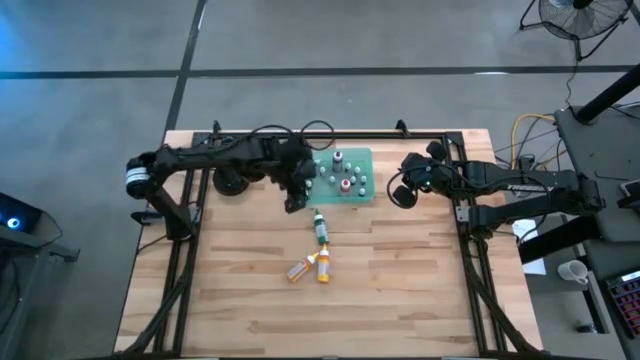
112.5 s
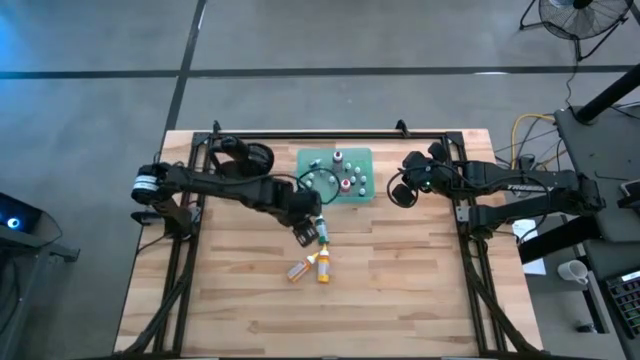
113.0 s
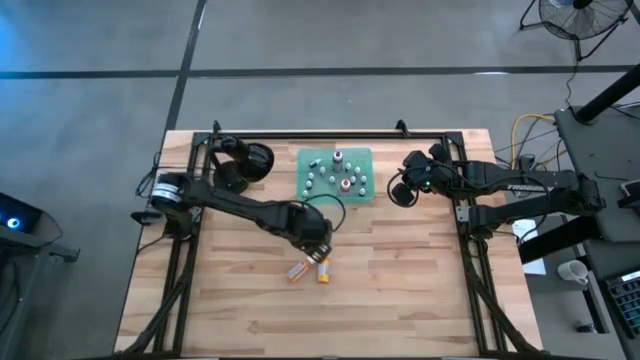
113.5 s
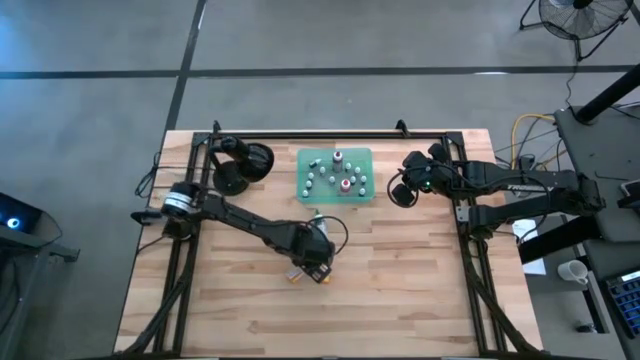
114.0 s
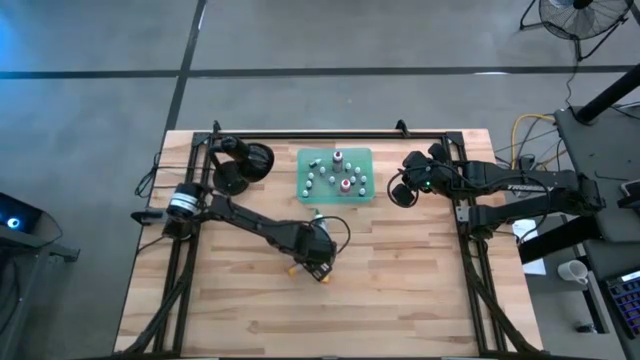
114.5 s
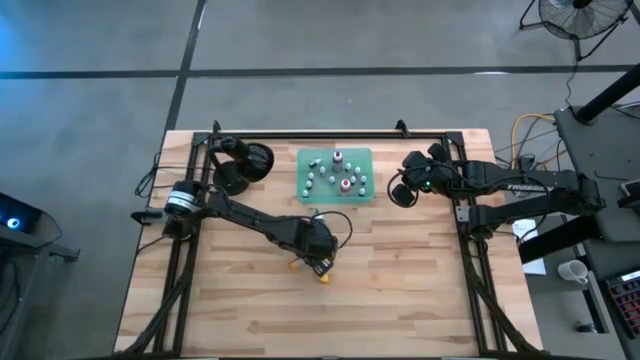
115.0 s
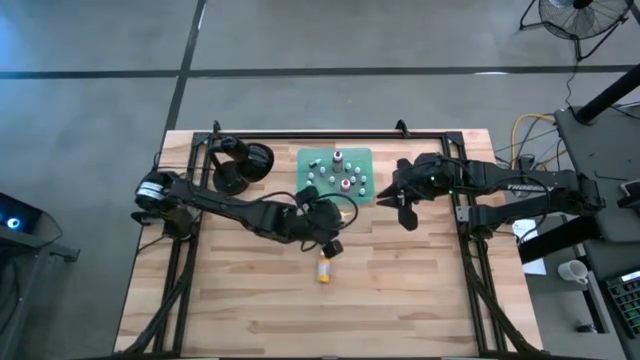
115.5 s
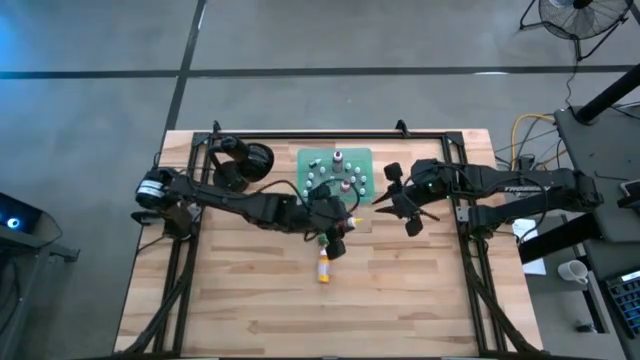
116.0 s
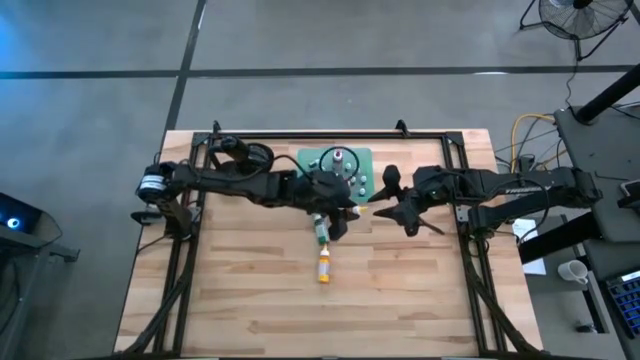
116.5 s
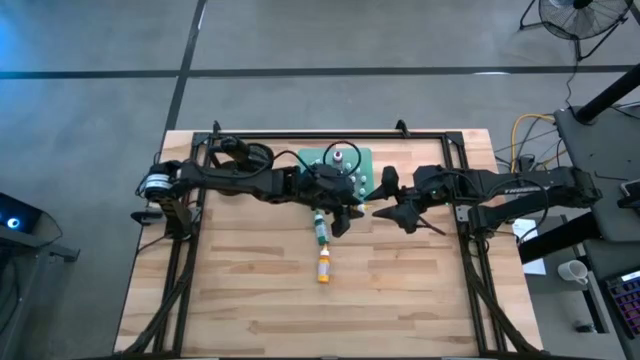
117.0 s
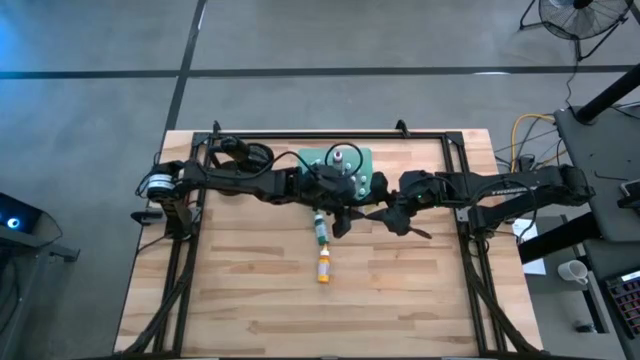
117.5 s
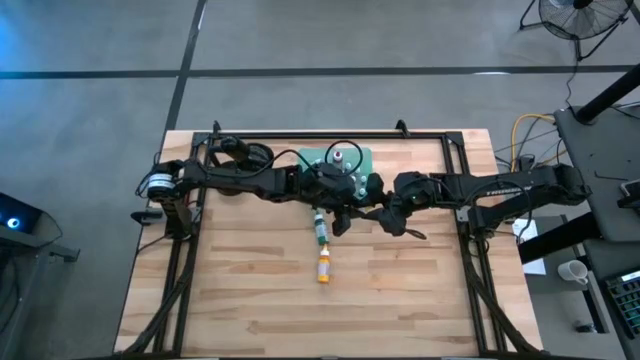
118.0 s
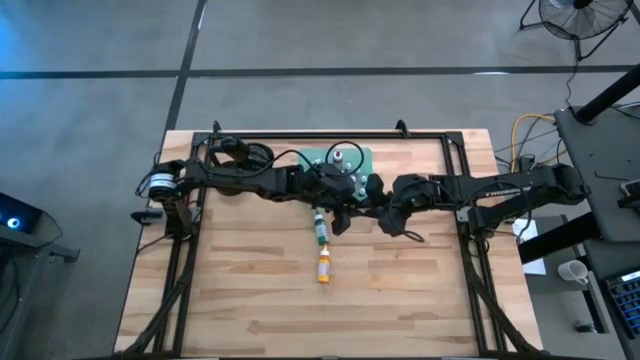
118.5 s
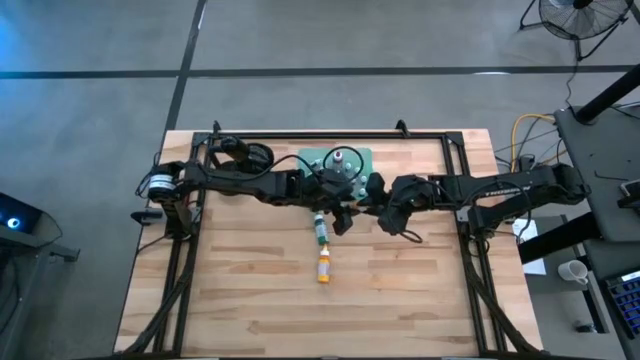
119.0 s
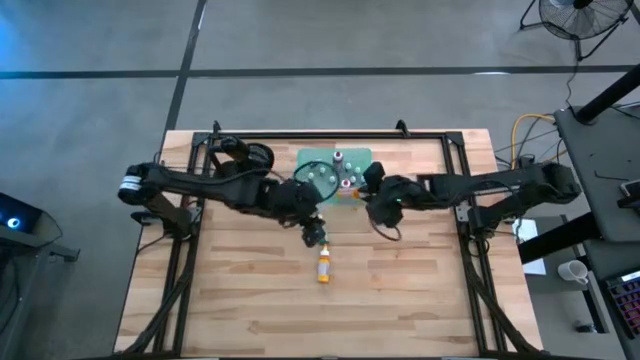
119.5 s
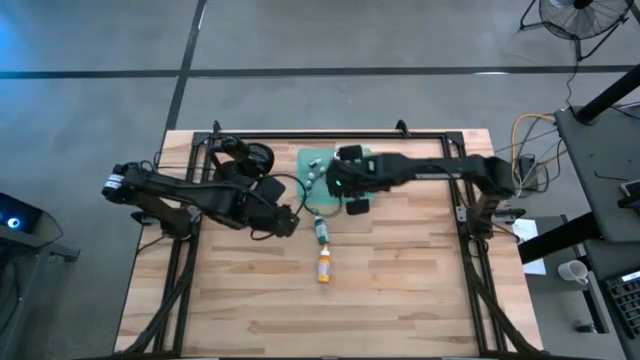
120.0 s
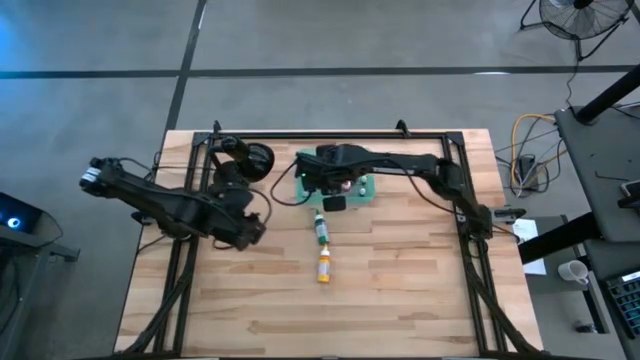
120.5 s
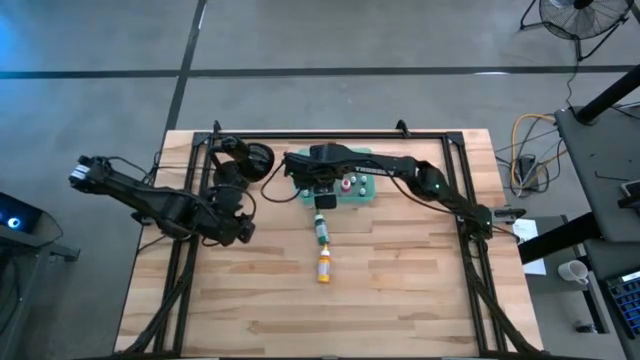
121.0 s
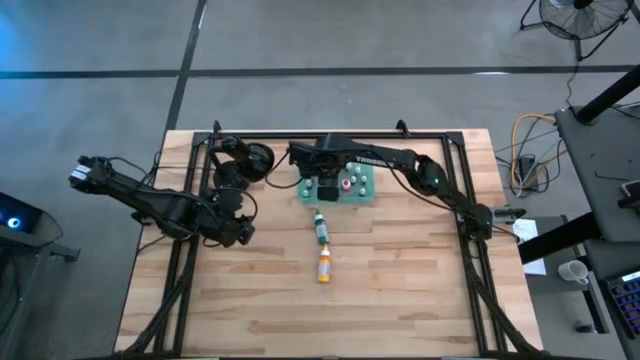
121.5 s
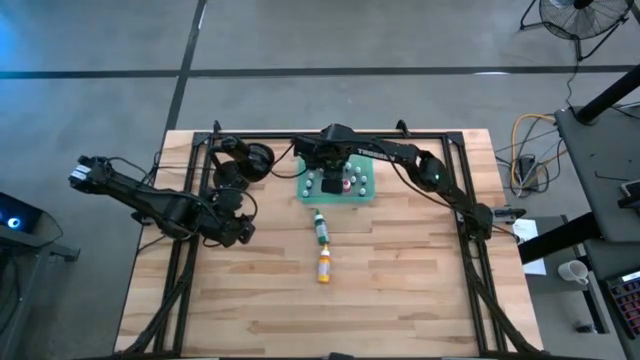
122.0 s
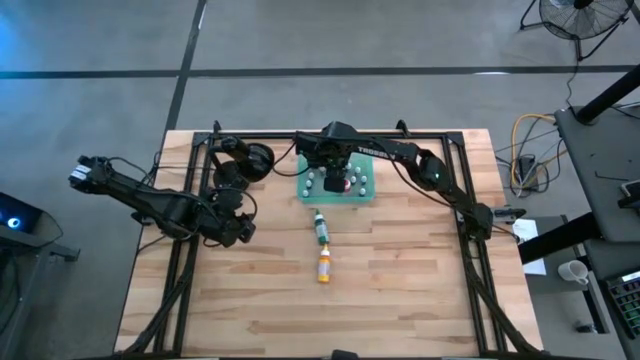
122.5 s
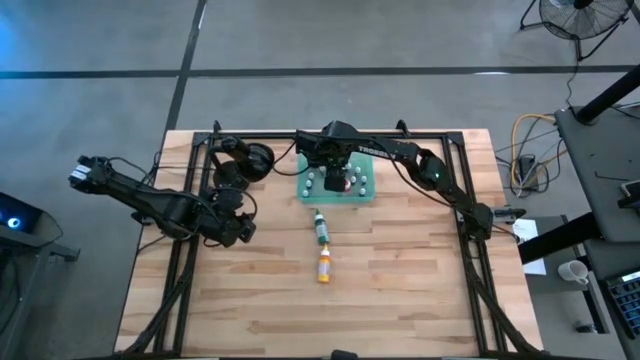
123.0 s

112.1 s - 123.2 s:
Task: Pick & Place food coloring
Put the left big yellow food coloring bottle into the bin

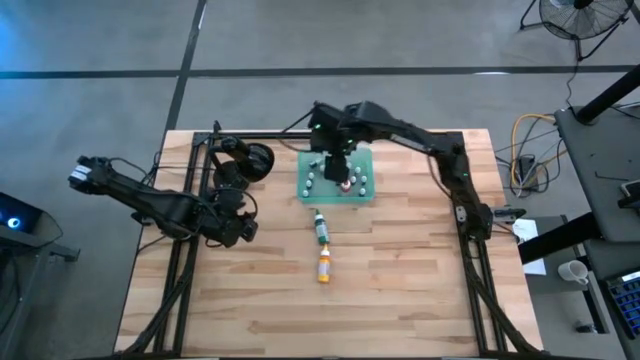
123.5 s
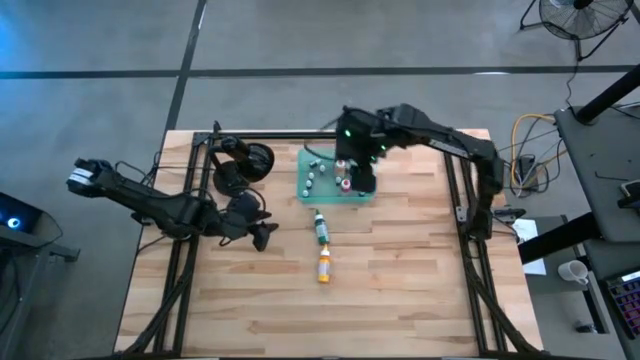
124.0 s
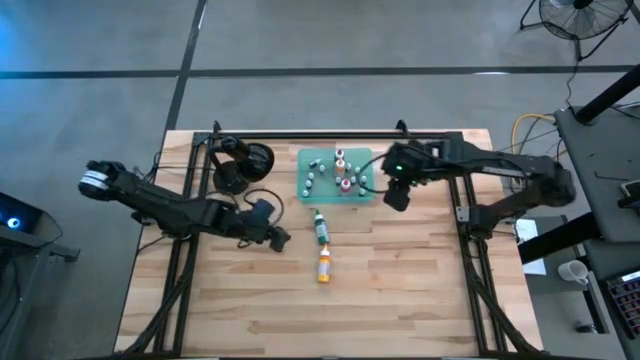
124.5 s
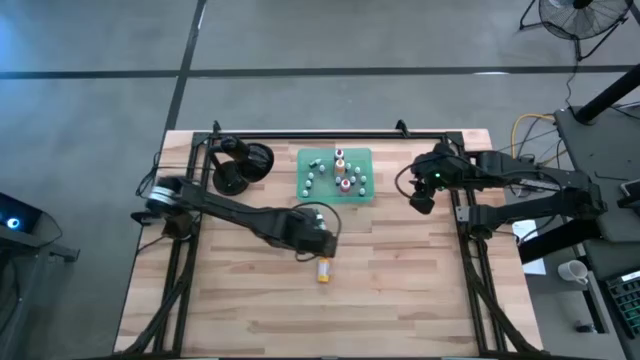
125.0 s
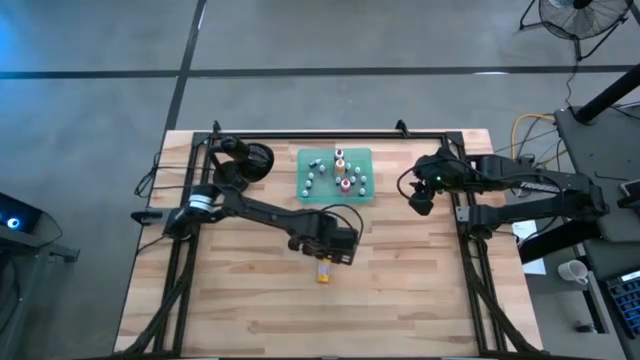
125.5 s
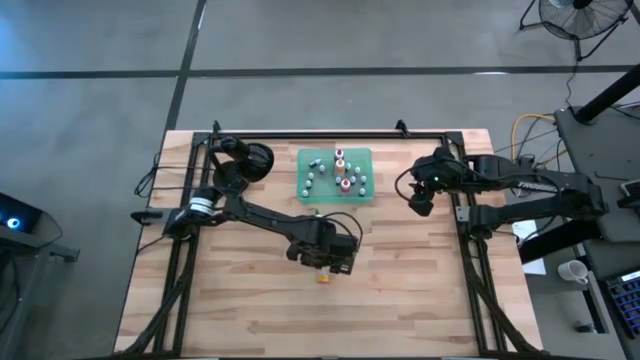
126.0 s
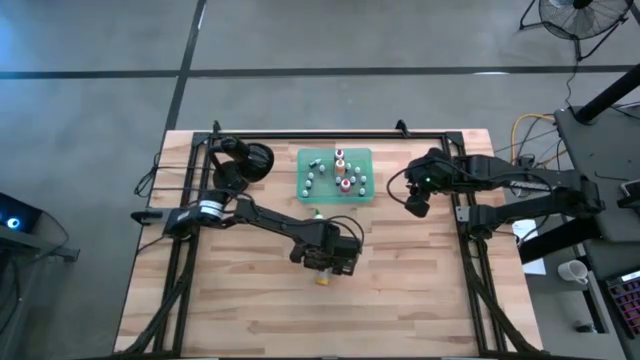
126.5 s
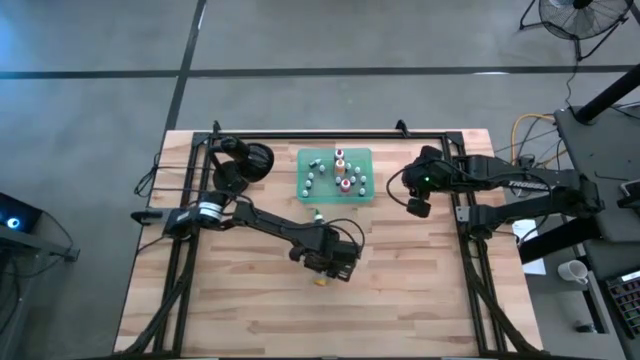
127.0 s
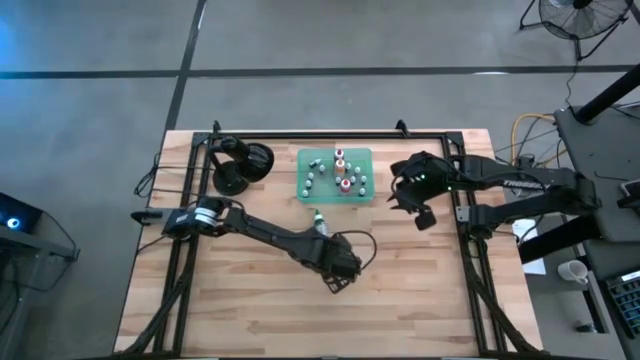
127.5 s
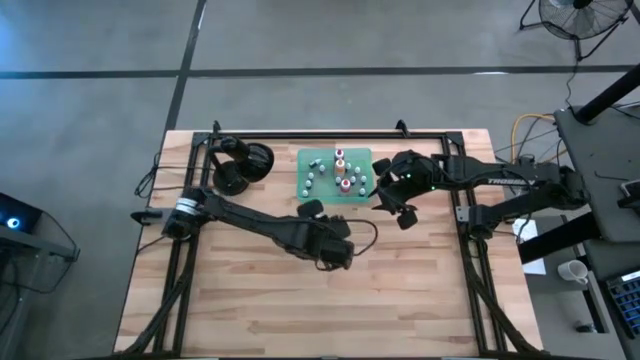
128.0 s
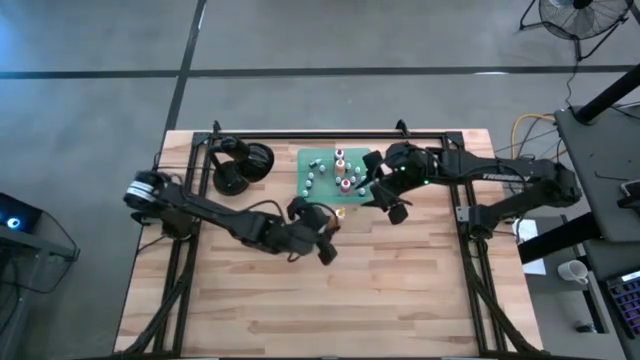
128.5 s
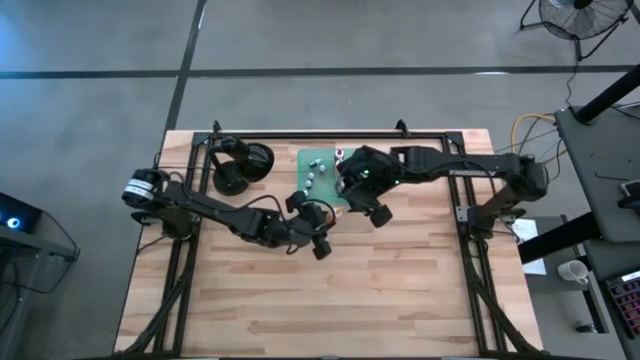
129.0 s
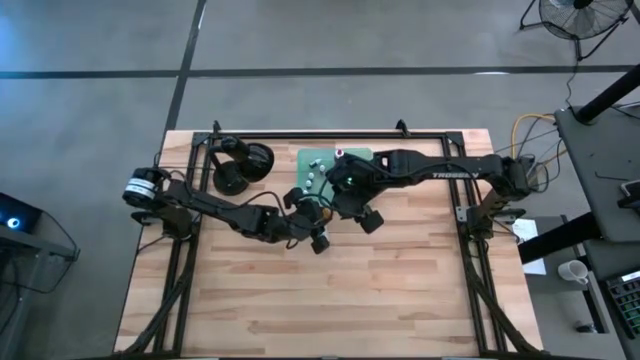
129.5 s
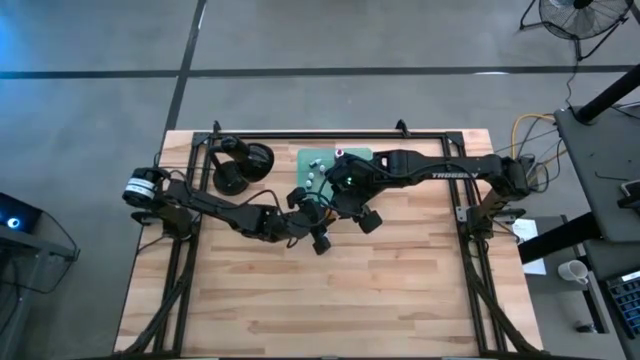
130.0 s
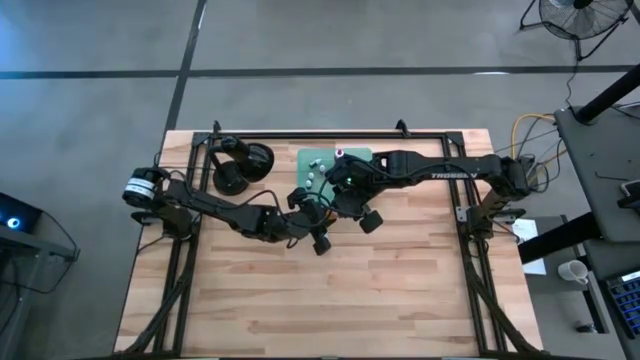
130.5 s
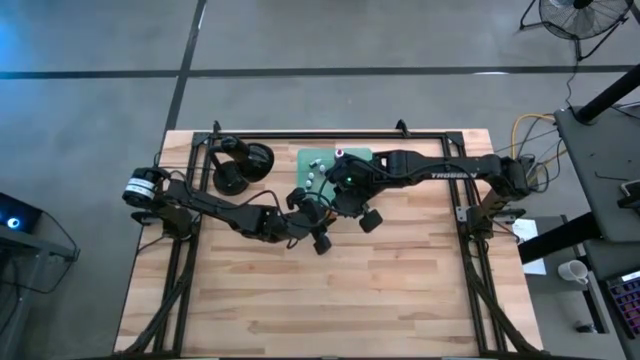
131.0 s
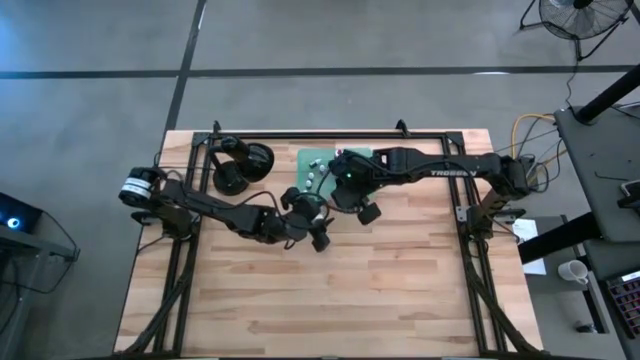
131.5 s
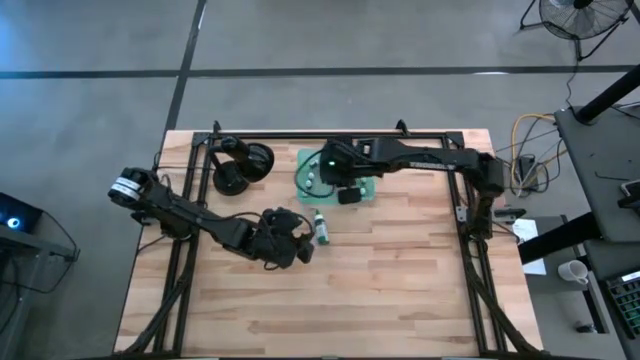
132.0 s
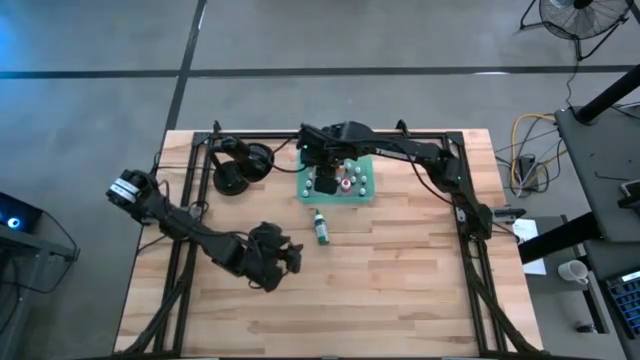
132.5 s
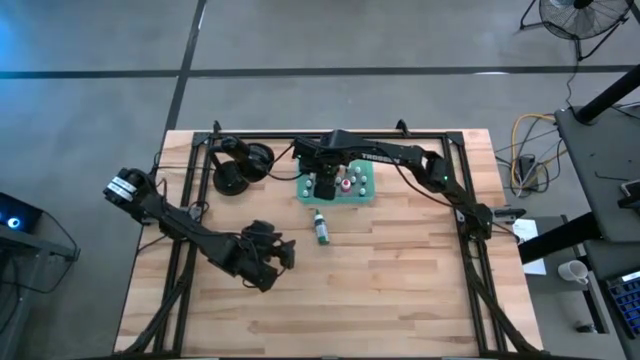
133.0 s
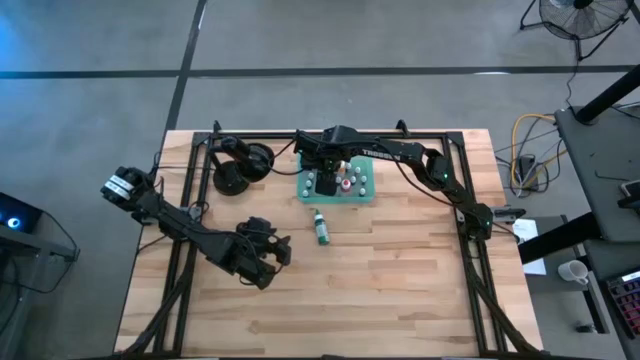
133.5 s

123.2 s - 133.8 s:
Put the big yellow food coloring bottle into the bin
